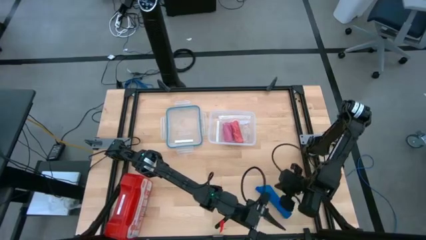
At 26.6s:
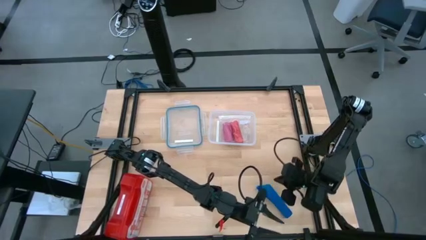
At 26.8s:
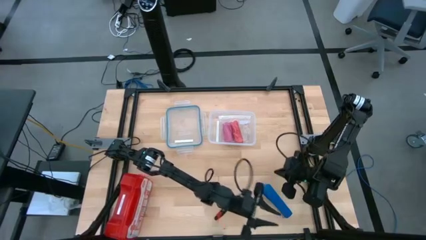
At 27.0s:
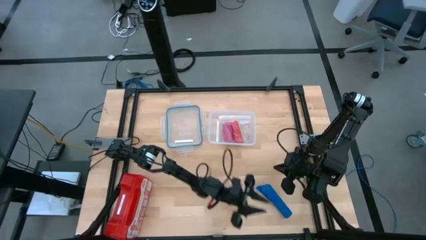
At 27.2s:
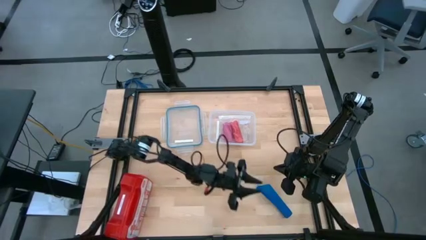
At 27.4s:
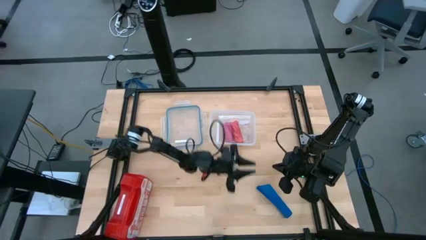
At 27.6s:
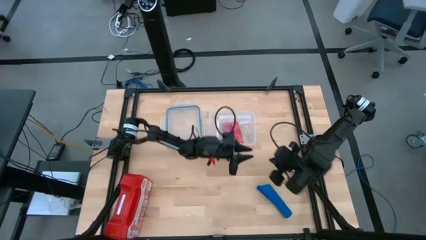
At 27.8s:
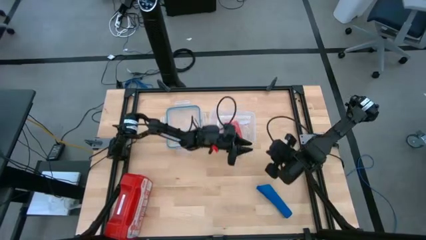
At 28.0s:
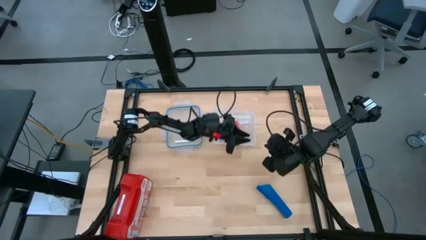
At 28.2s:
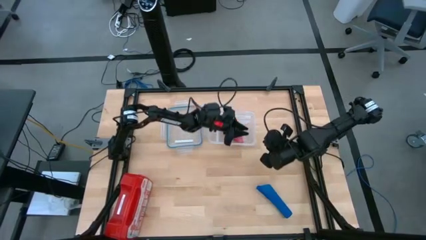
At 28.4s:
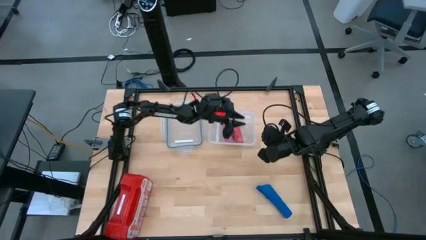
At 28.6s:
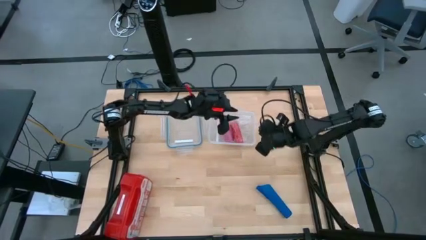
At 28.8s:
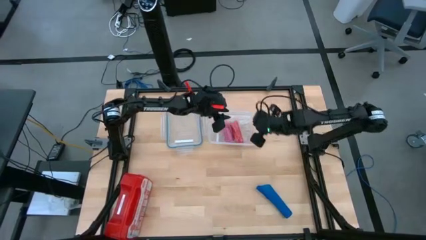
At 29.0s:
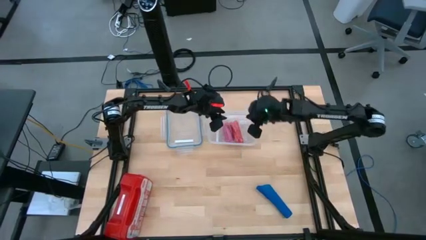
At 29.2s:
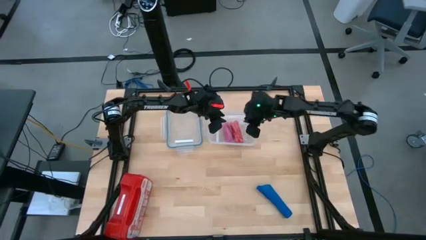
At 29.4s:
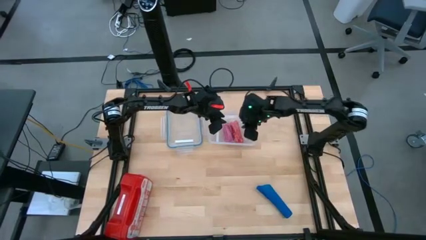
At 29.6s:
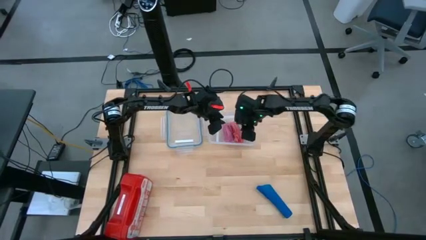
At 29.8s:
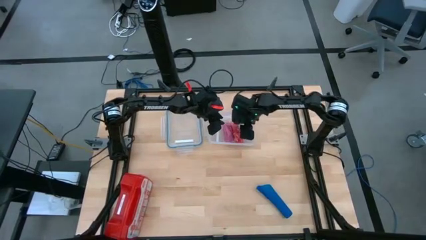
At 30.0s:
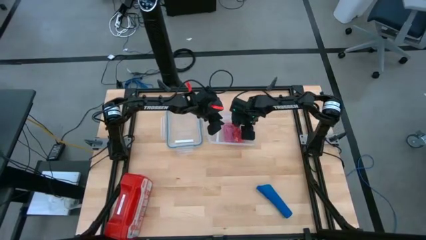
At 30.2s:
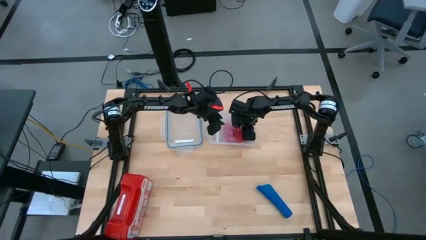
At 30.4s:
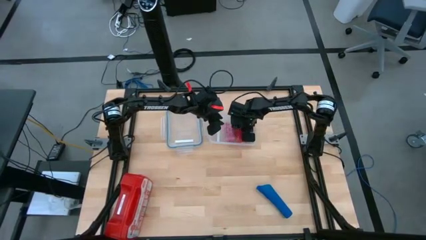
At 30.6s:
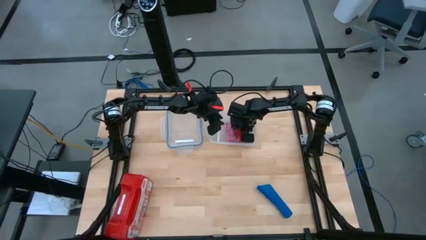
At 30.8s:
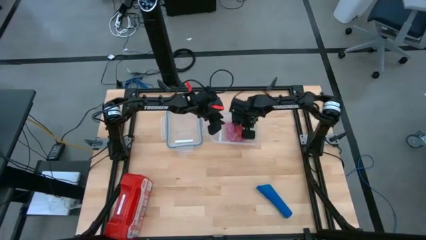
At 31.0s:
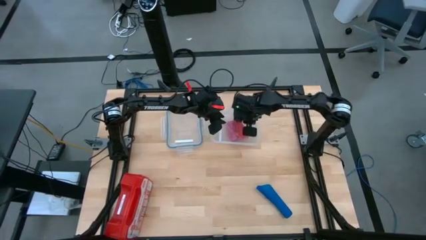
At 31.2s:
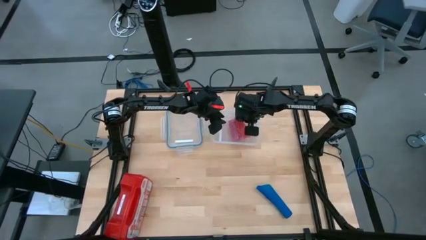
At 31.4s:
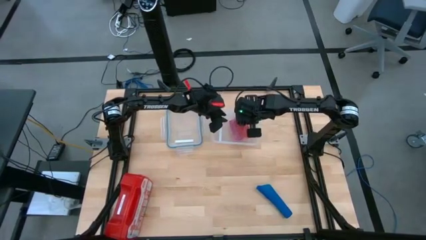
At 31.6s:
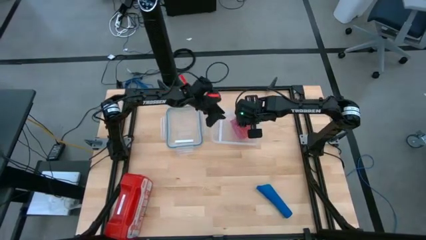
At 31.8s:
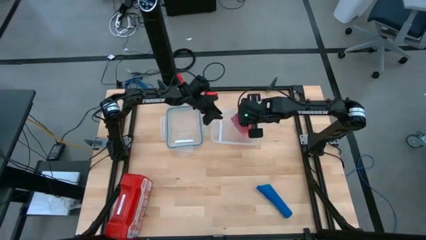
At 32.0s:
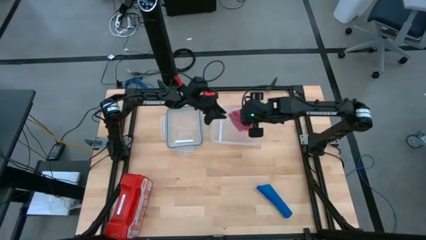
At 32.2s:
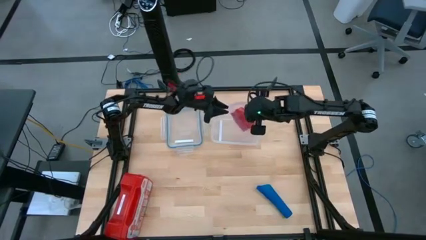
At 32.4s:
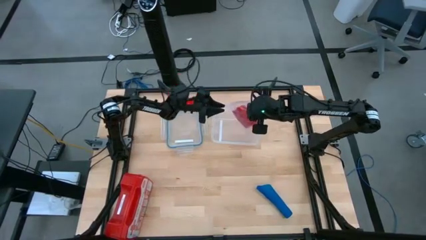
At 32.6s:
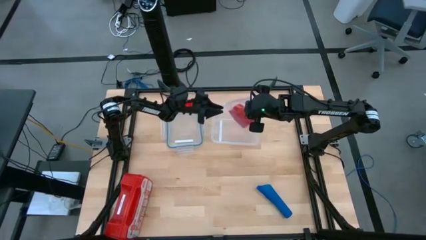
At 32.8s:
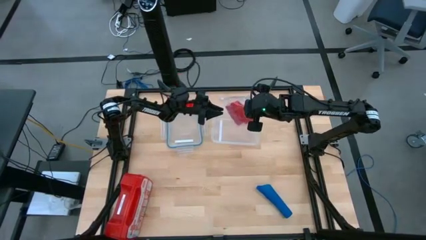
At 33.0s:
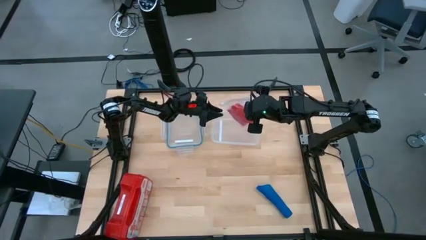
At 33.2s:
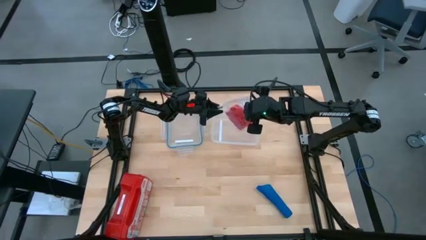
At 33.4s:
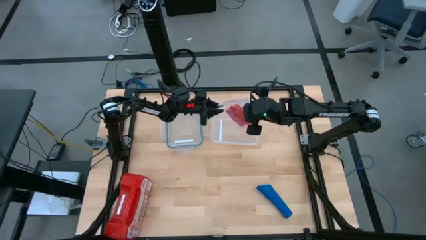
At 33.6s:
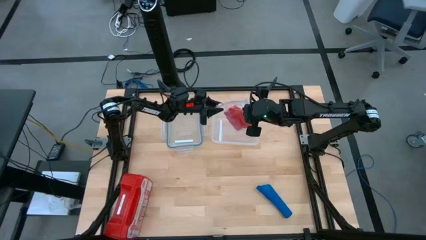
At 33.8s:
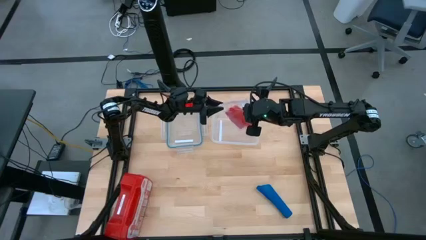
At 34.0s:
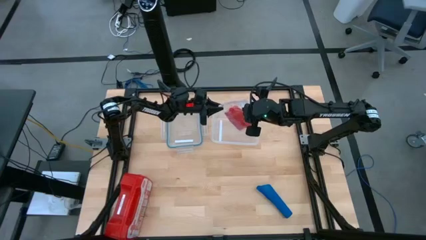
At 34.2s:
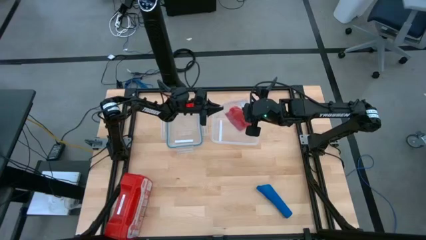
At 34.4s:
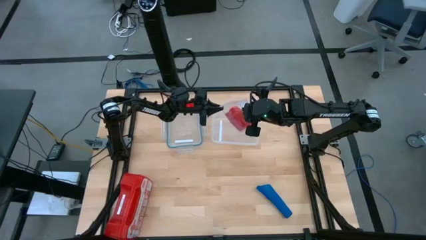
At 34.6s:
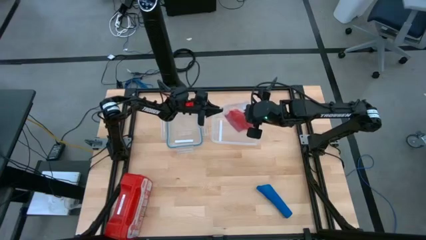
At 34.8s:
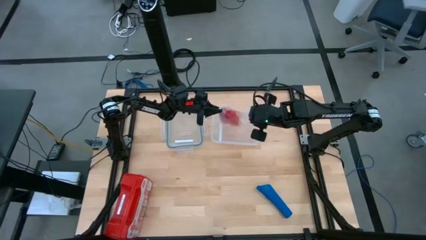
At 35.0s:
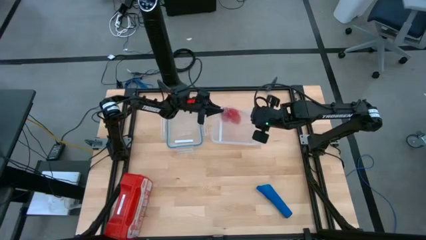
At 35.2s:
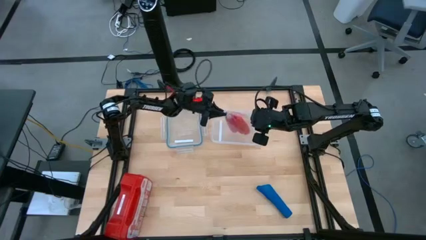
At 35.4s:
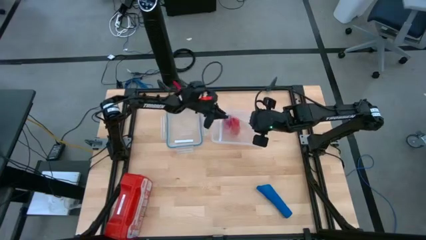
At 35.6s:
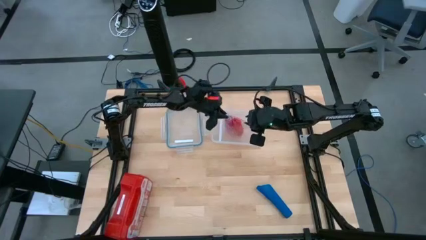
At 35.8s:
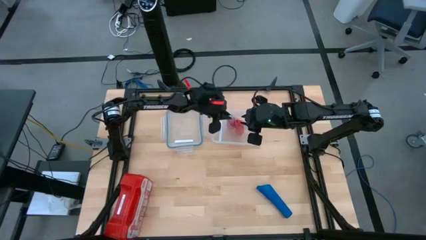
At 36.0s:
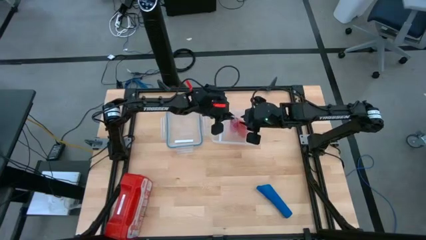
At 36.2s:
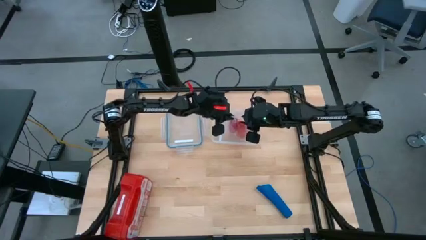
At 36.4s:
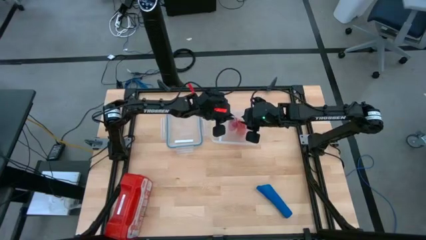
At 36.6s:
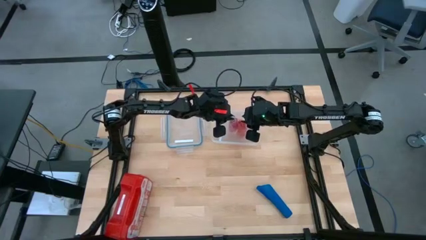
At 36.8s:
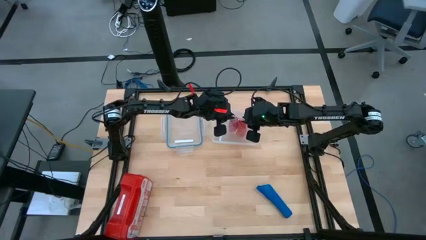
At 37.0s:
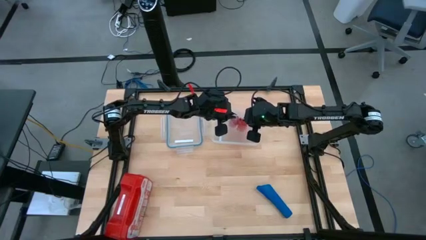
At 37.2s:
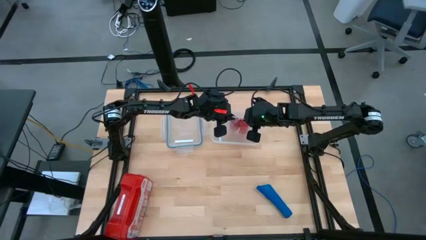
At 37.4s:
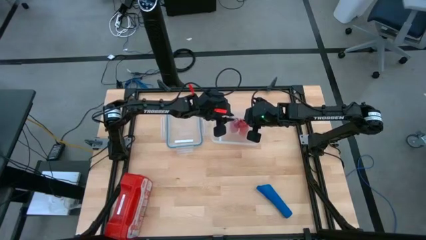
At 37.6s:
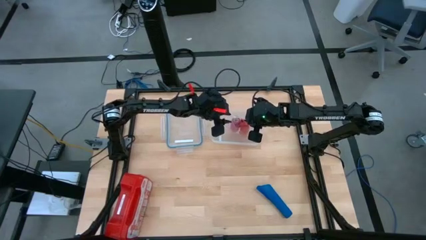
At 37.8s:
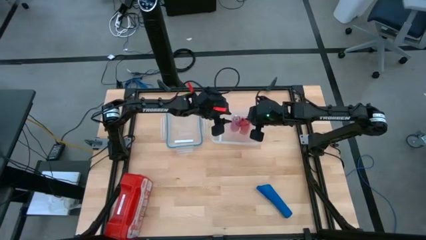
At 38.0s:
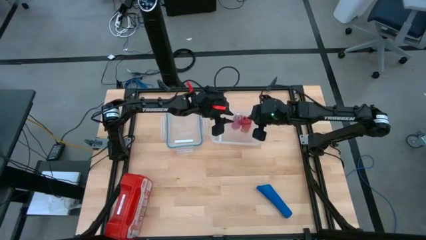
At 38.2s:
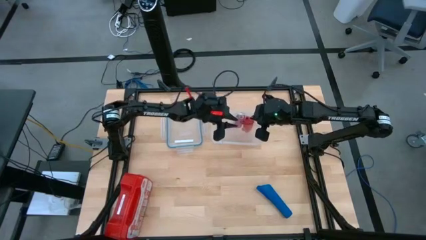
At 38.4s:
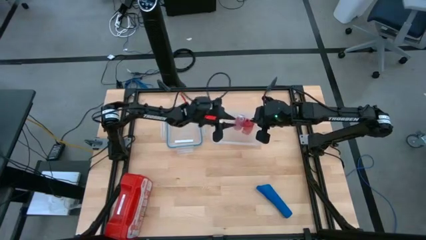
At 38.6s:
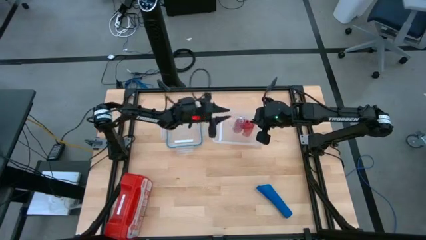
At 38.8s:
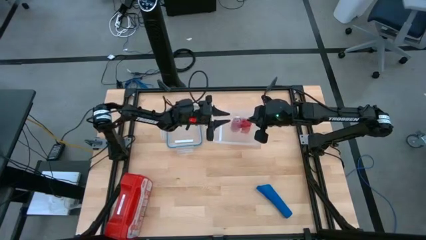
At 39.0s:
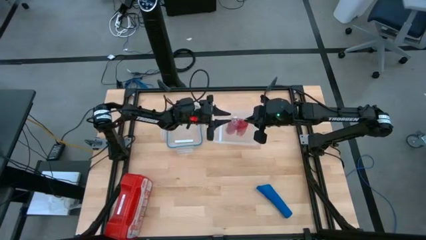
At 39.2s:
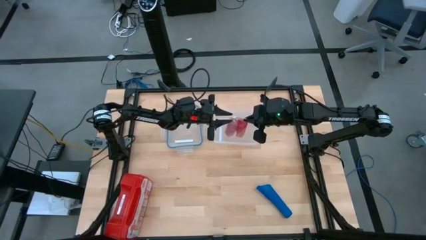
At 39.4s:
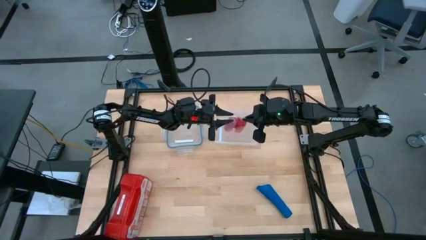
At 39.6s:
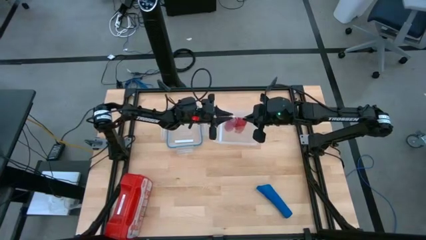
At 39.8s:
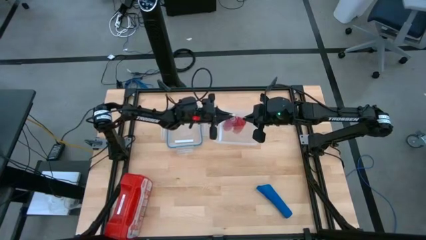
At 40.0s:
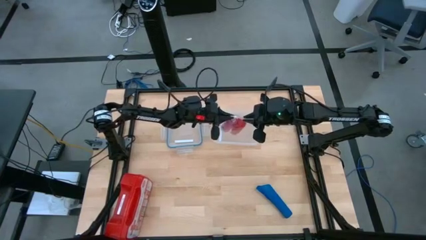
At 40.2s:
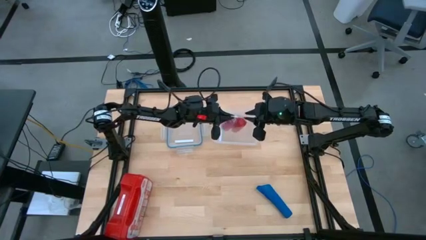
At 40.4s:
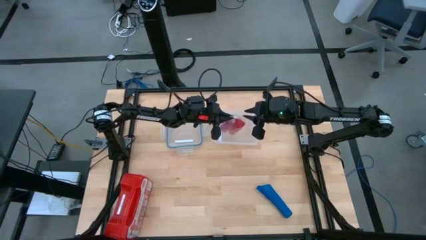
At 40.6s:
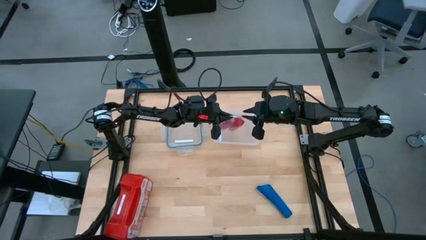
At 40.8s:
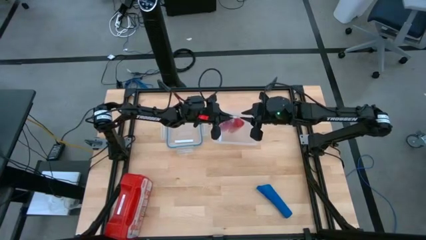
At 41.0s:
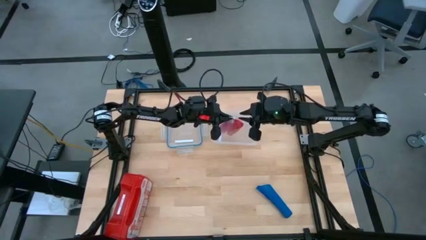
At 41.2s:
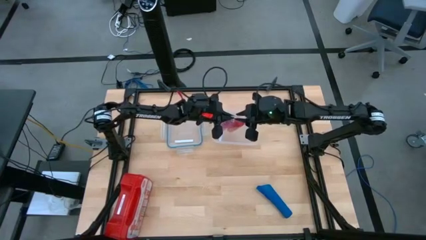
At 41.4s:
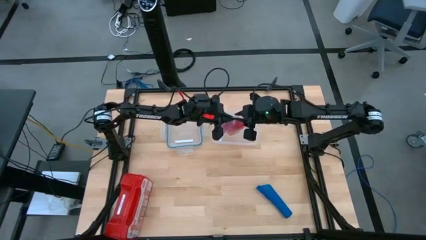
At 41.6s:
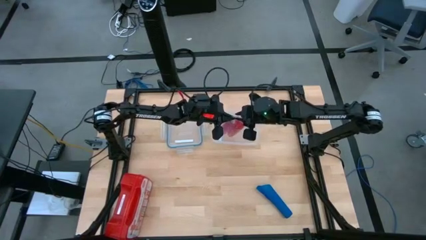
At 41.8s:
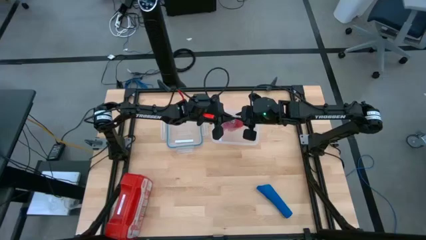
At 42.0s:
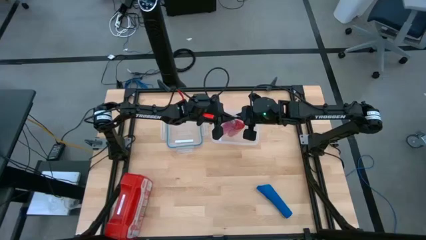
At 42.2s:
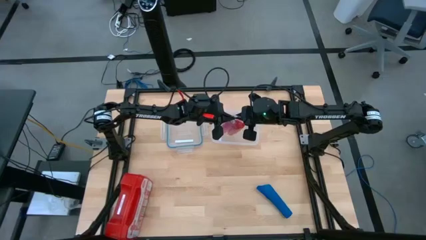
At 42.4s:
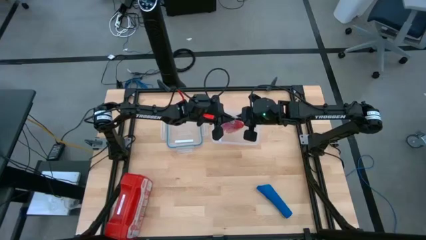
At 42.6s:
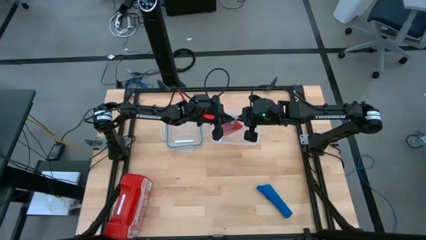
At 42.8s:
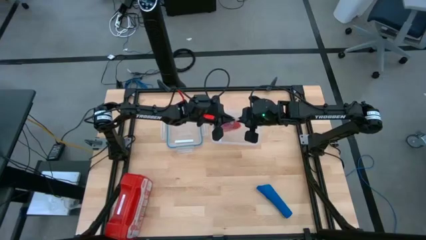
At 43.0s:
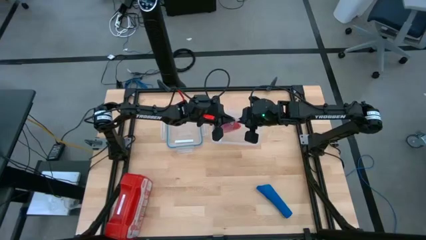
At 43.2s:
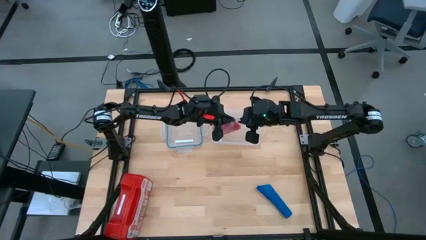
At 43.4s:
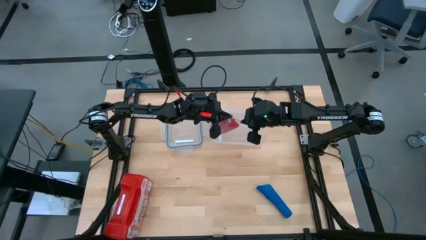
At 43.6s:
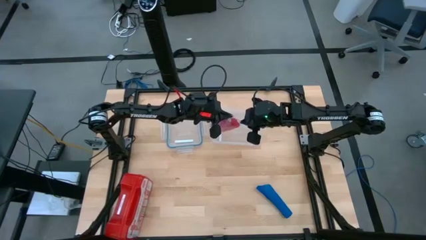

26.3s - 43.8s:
Task: Roll bandage
Open the transparent zip bag
